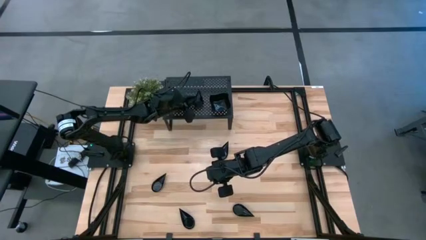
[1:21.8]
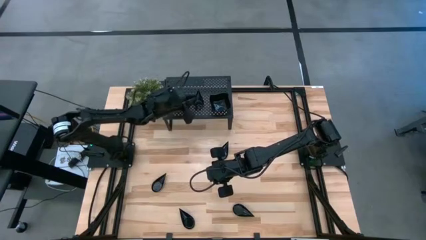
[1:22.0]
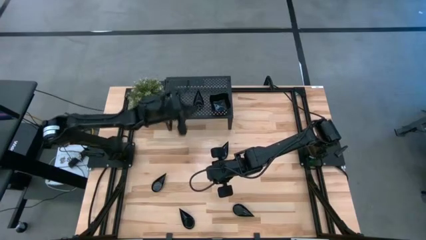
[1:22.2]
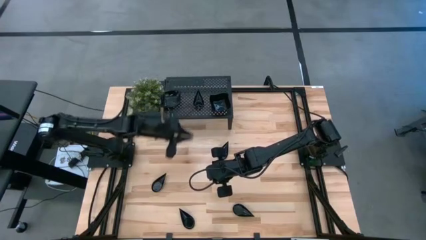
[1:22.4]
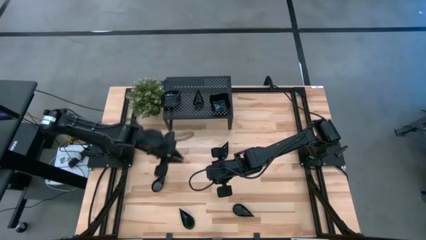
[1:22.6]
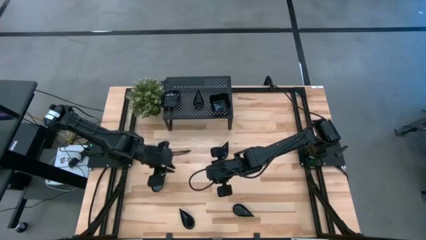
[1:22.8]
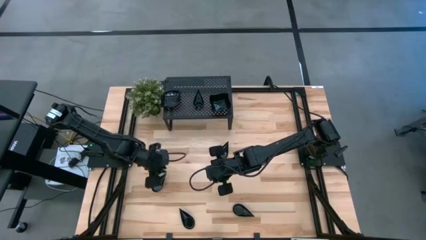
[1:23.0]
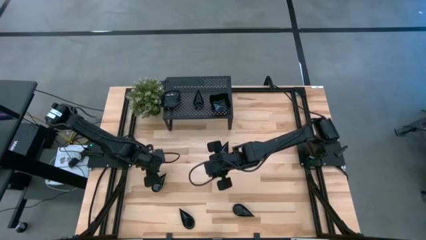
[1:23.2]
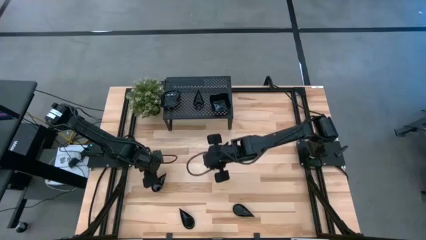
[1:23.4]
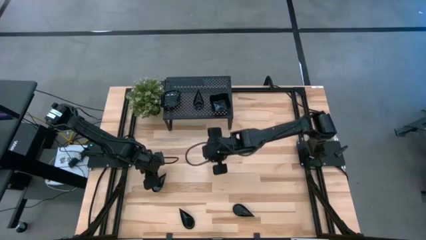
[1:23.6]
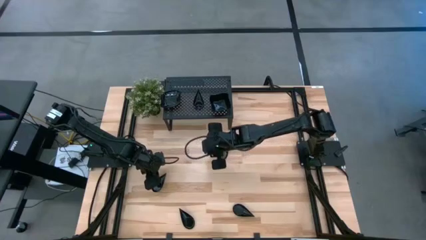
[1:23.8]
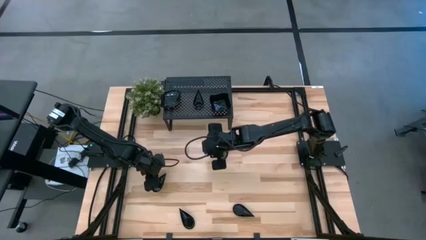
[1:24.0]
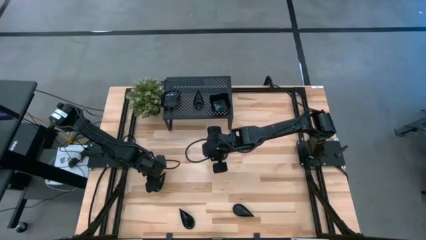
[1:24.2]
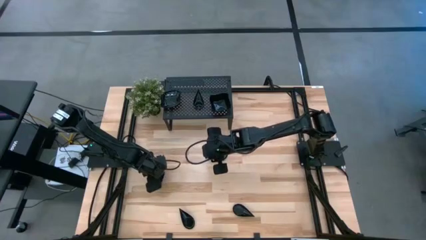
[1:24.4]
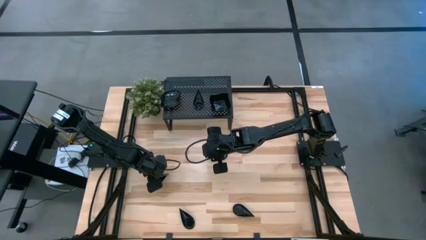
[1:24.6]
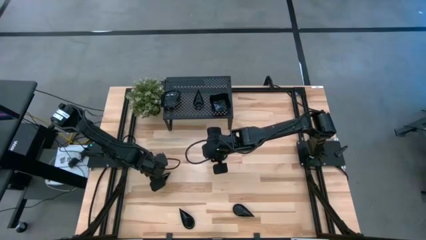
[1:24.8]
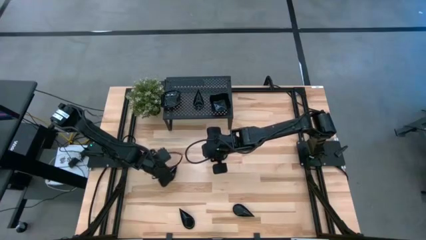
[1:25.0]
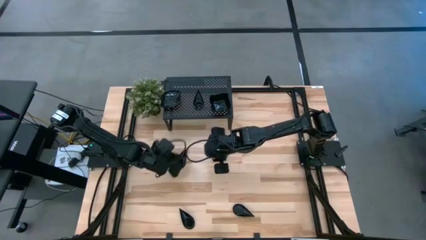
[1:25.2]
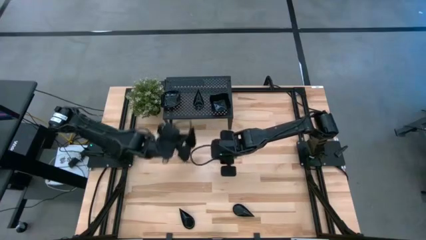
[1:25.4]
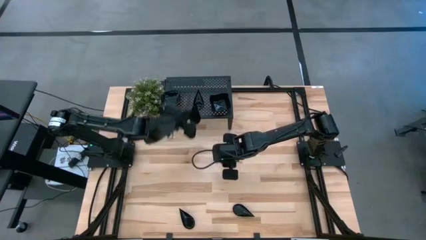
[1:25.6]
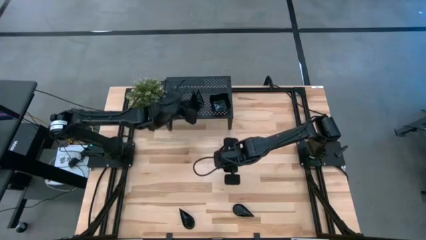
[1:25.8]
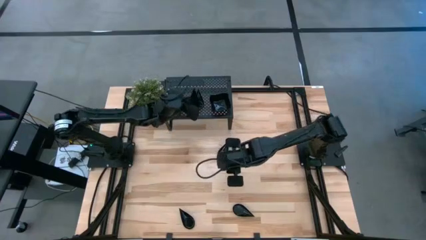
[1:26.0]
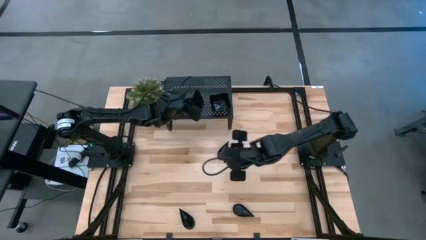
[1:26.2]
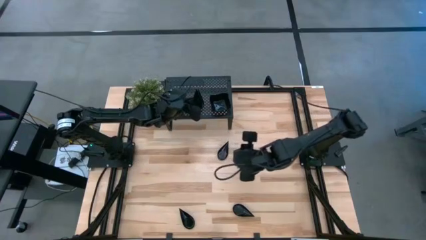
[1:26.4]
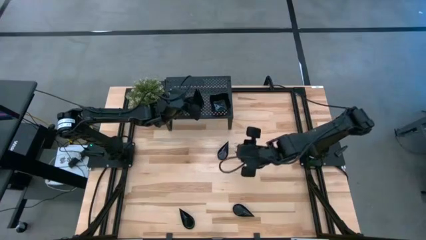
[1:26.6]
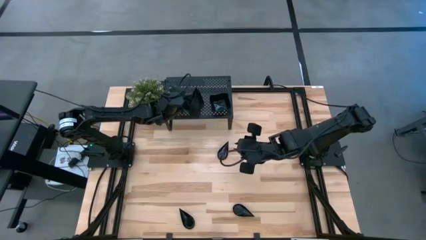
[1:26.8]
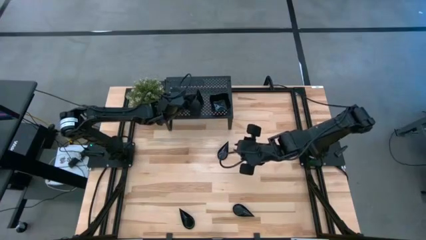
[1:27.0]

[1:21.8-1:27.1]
Task: Pick & Place Mini shaped plates
Stack the black drop-shaped plate on top of the black drop-shaped plate on the shelf

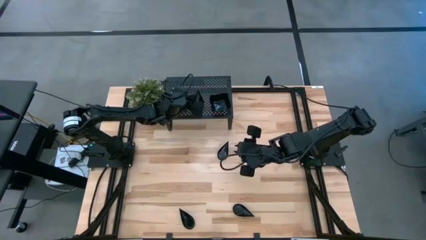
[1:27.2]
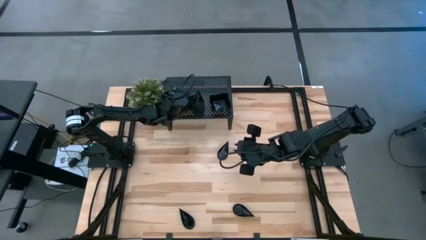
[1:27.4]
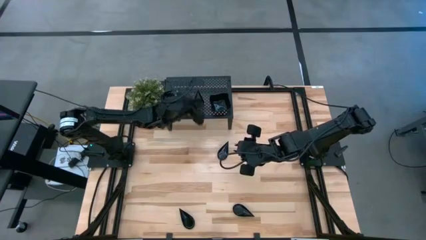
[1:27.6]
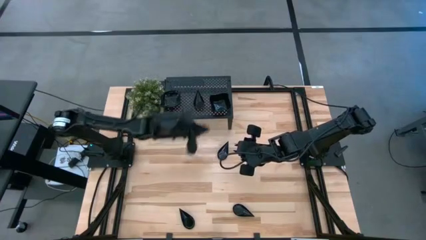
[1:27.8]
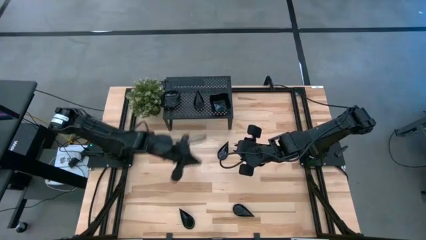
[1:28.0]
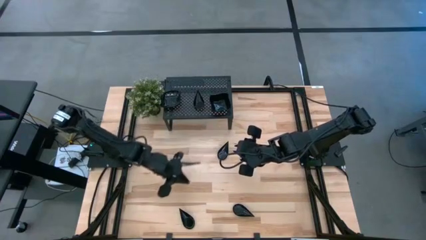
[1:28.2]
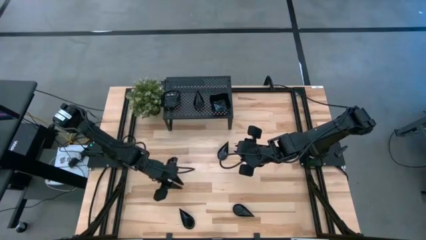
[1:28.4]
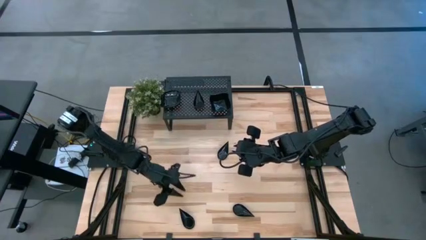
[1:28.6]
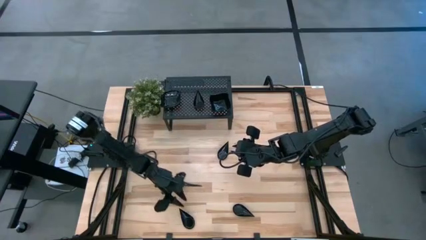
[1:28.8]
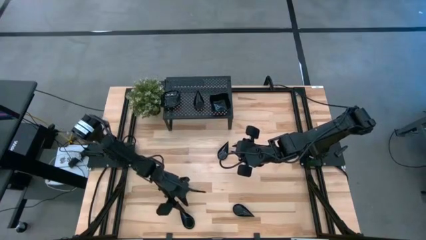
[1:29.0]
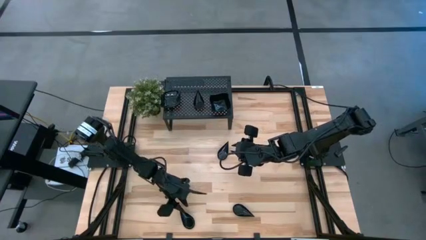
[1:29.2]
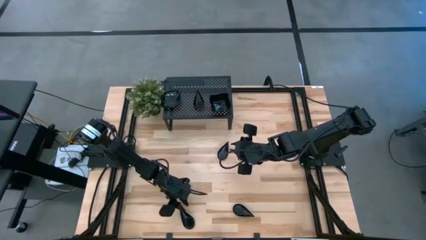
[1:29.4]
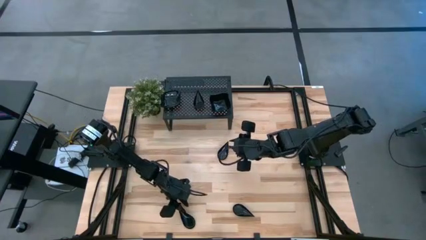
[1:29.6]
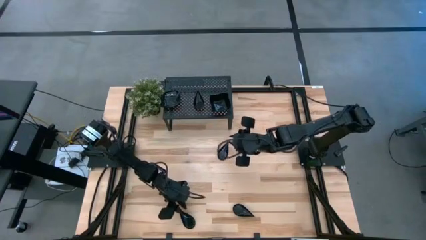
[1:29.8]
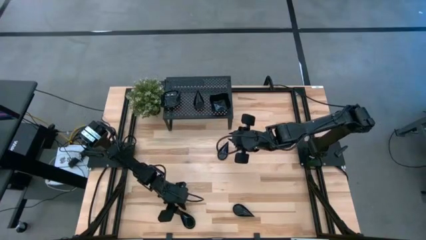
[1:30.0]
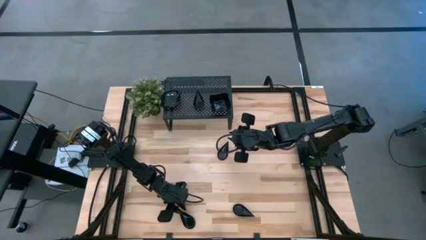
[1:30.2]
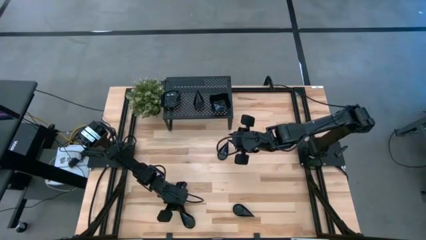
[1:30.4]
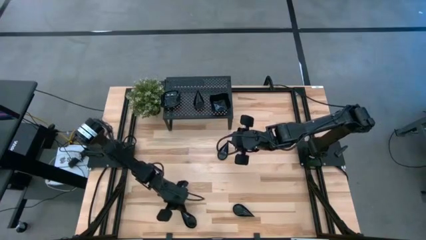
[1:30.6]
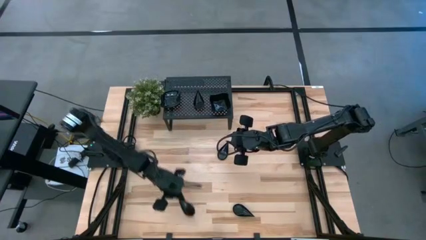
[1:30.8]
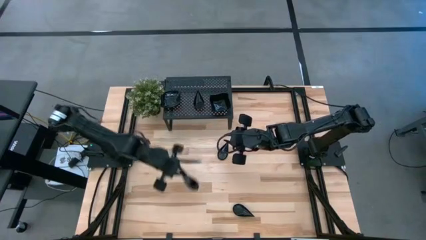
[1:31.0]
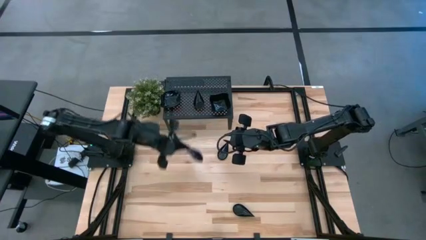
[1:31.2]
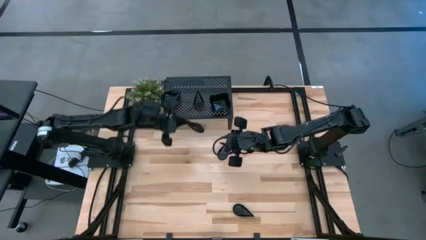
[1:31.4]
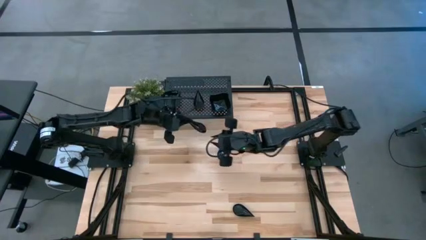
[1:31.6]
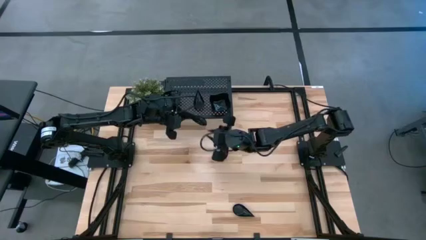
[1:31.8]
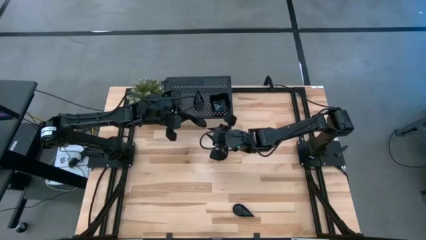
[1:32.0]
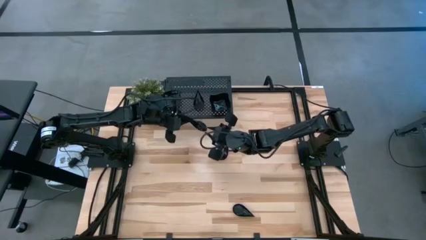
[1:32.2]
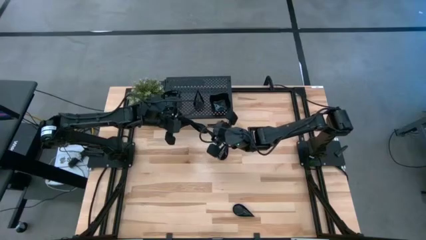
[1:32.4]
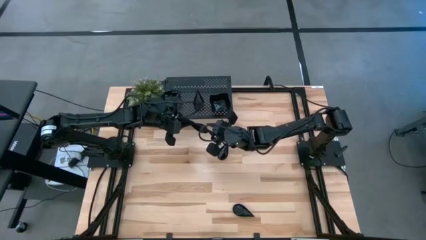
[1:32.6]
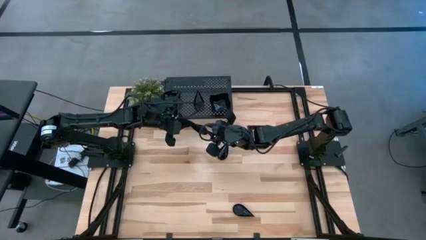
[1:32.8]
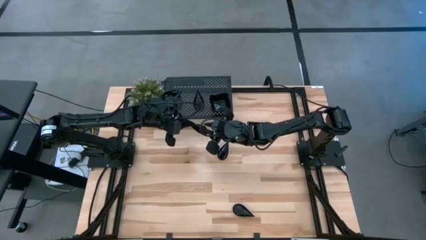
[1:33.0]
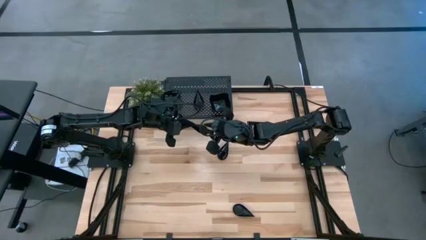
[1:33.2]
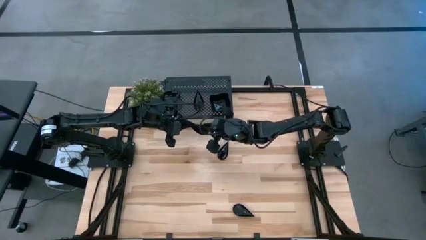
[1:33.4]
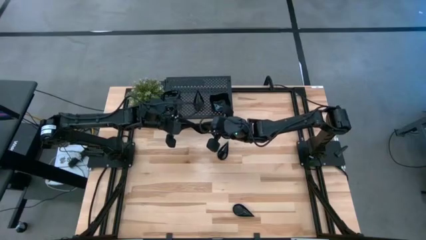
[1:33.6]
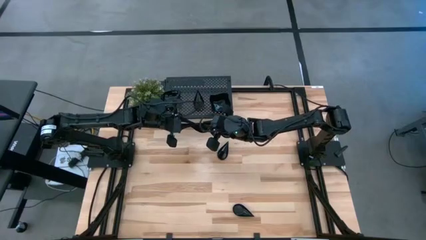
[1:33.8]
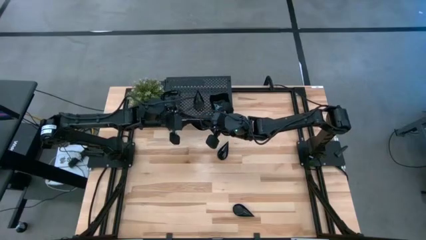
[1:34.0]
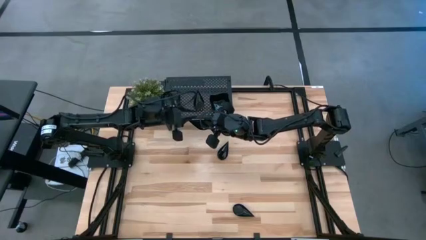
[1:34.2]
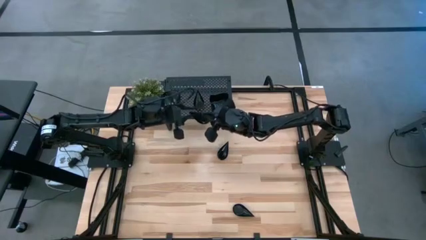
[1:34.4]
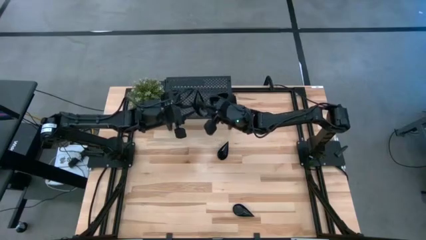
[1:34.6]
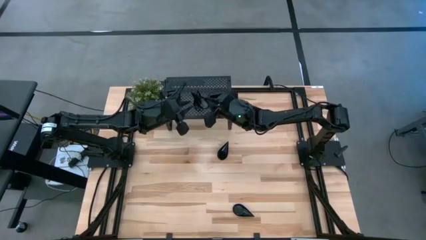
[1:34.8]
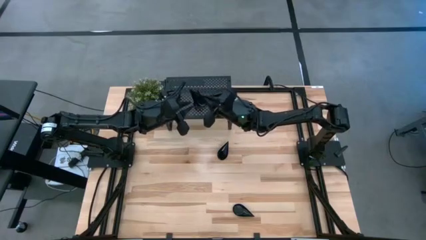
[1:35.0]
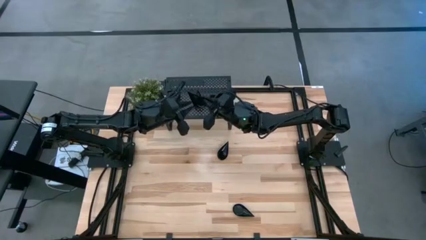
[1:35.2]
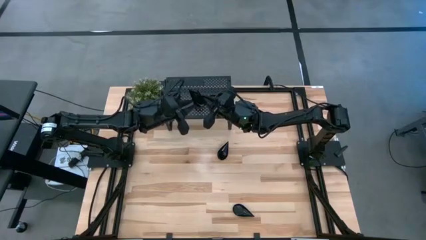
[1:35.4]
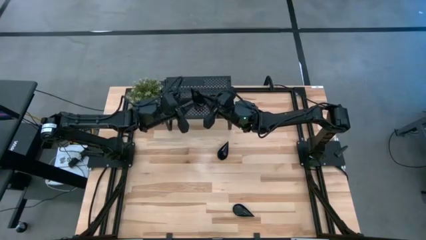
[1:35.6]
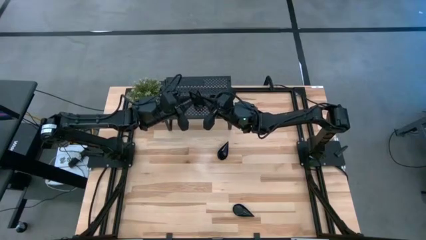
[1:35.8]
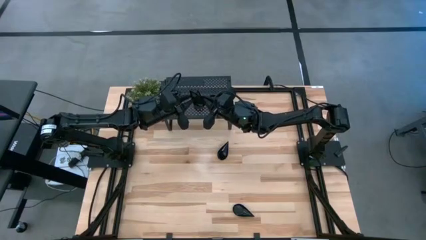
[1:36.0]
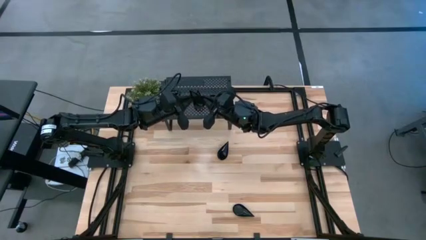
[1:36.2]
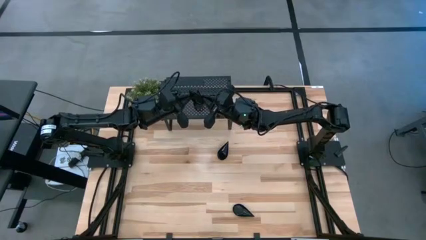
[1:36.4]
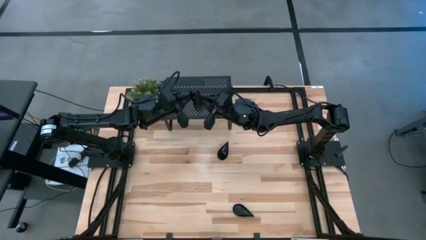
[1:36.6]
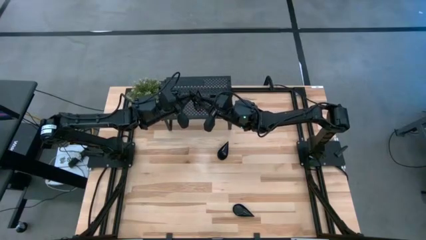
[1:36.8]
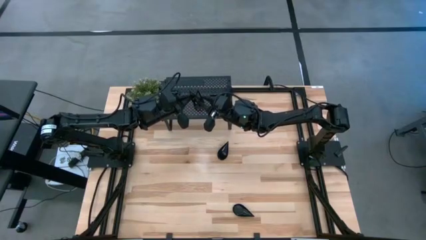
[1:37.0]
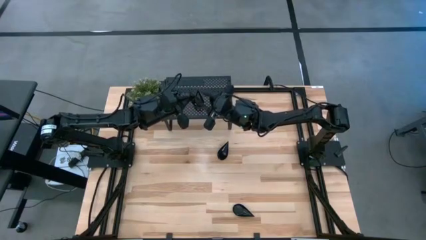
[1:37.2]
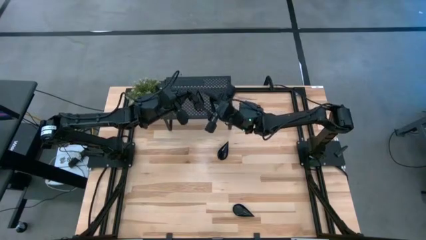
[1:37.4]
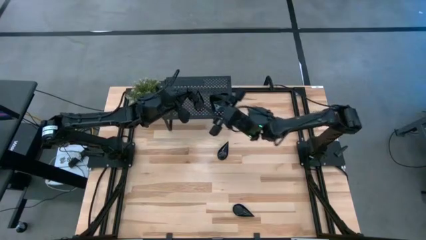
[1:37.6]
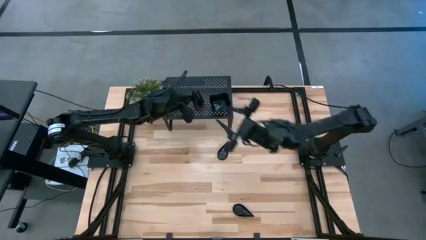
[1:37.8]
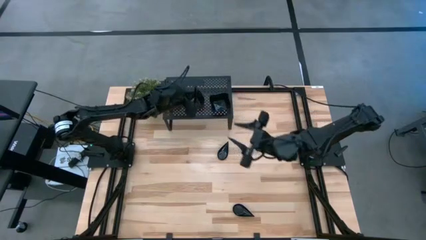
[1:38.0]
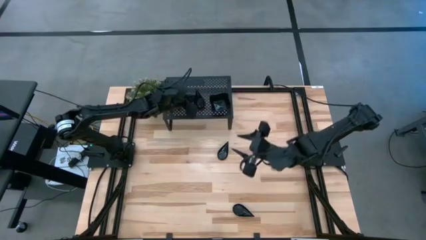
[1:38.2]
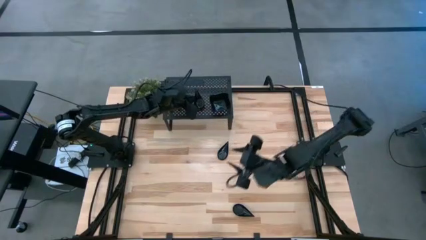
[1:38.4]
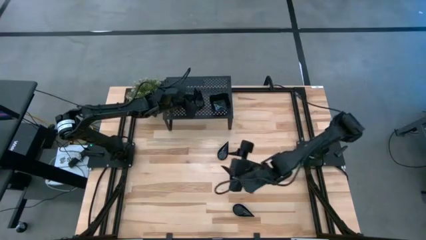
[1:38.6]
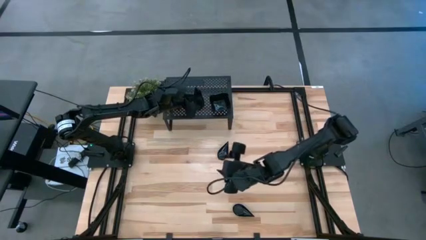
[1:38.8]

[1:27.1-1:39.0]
Stack the black drop-shaped plate on top of the black drop-shaped plate on the shelf
